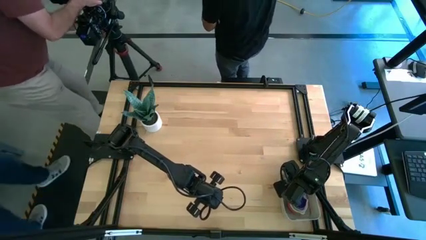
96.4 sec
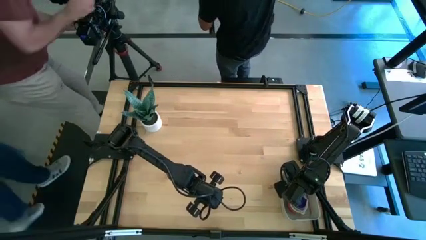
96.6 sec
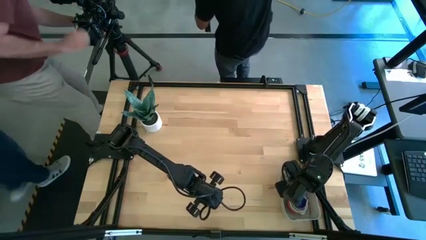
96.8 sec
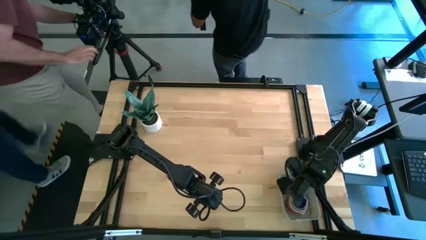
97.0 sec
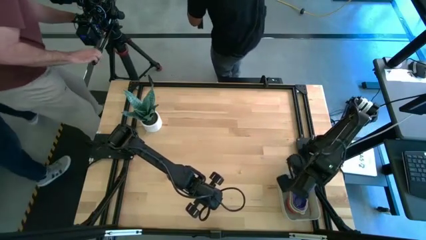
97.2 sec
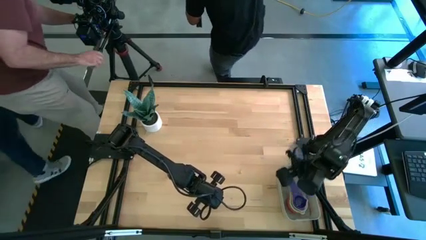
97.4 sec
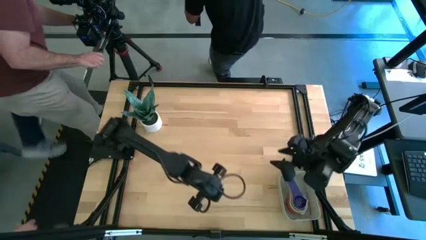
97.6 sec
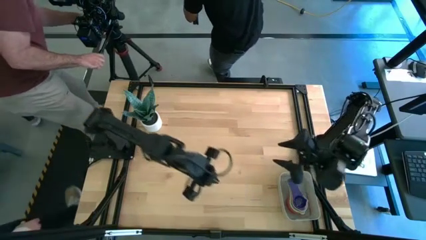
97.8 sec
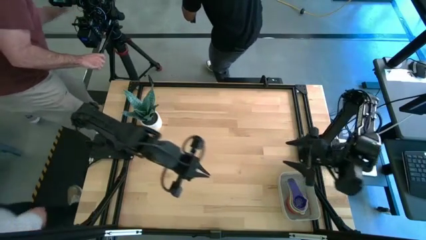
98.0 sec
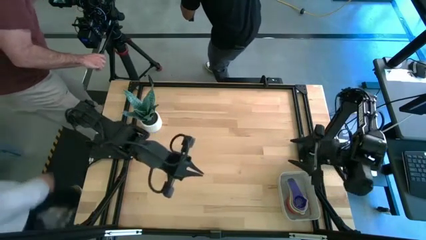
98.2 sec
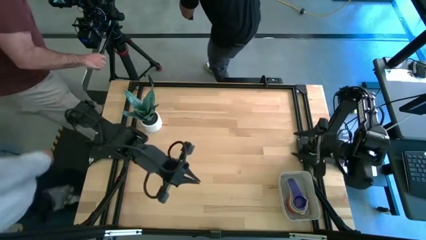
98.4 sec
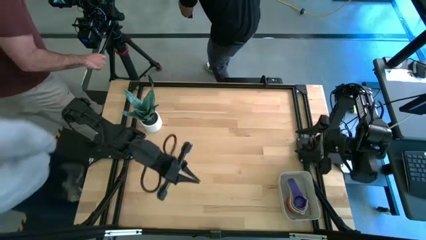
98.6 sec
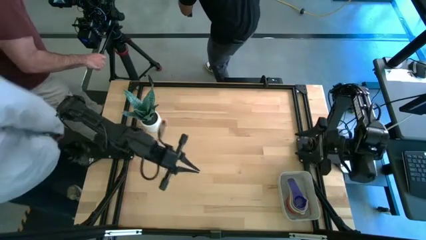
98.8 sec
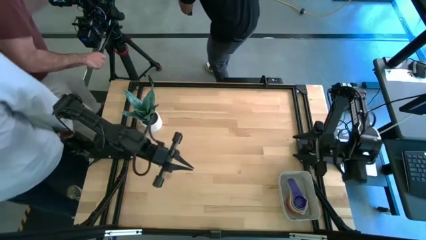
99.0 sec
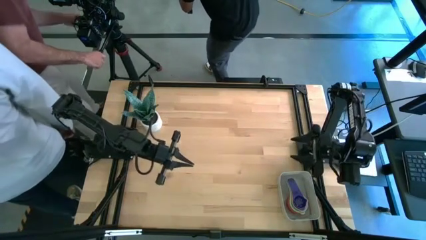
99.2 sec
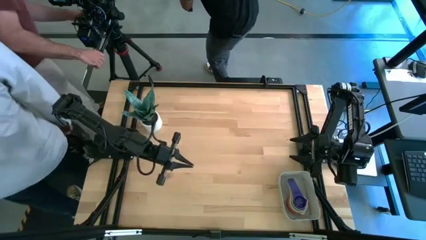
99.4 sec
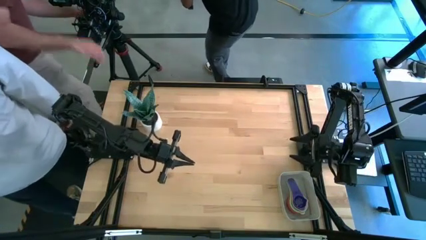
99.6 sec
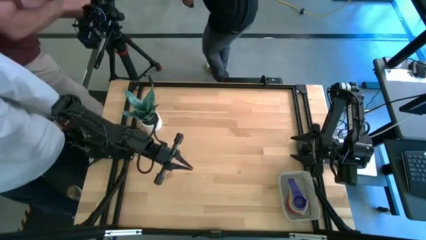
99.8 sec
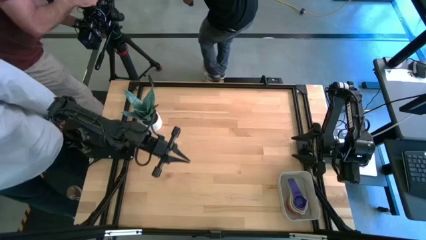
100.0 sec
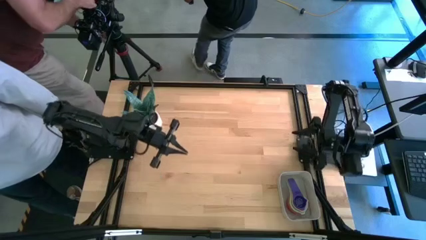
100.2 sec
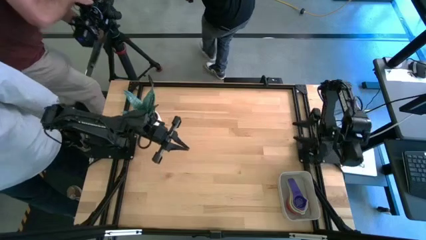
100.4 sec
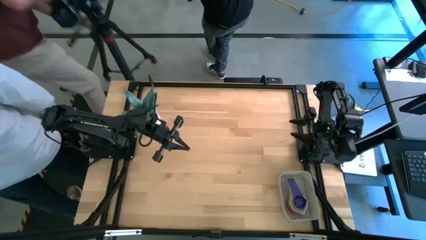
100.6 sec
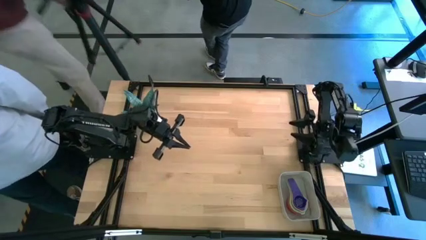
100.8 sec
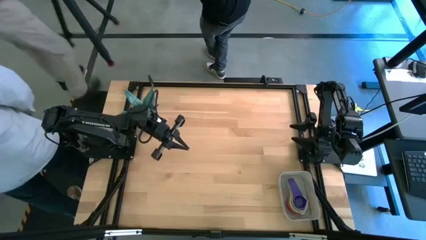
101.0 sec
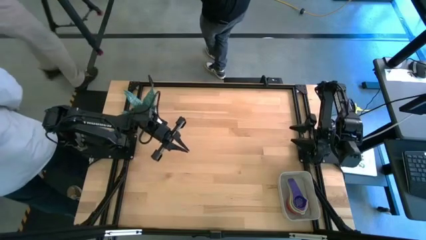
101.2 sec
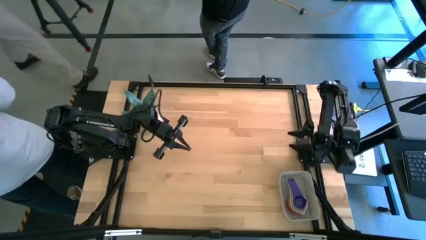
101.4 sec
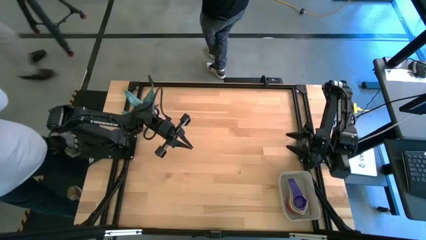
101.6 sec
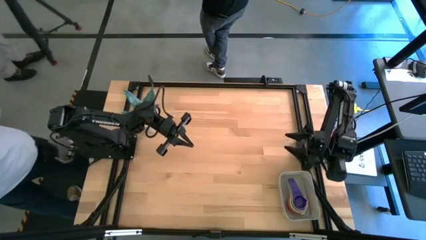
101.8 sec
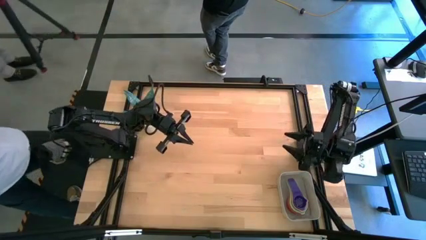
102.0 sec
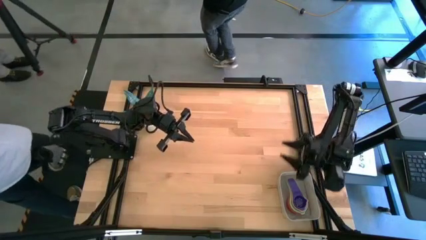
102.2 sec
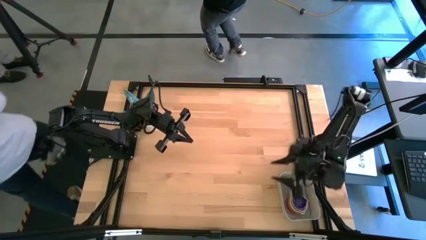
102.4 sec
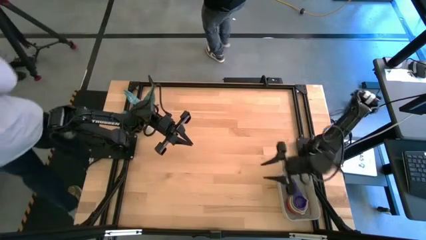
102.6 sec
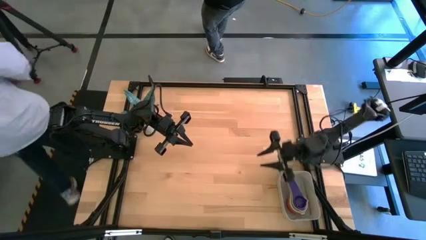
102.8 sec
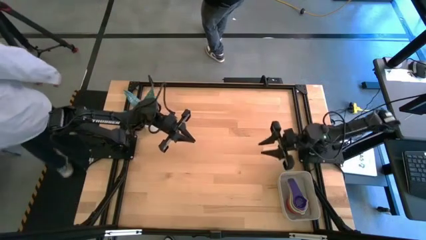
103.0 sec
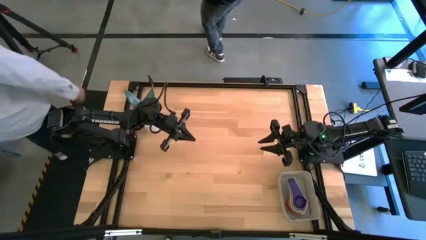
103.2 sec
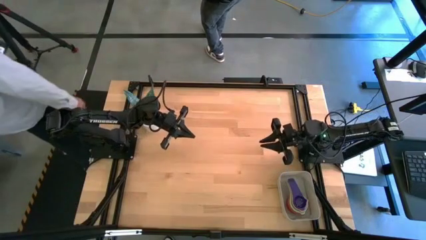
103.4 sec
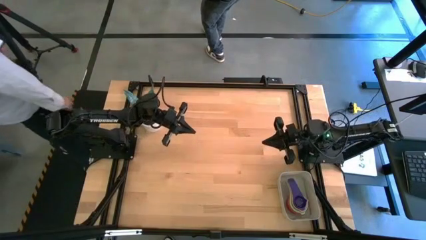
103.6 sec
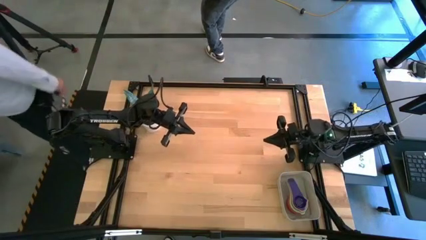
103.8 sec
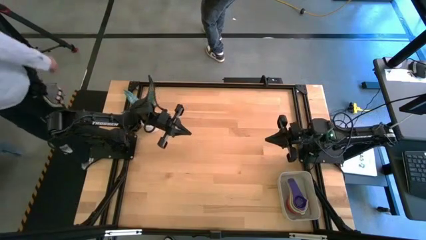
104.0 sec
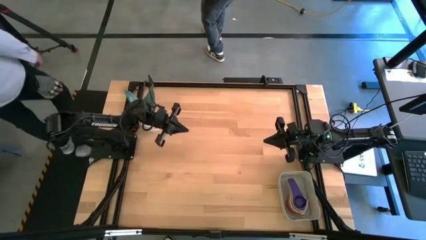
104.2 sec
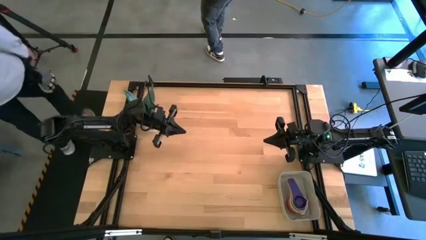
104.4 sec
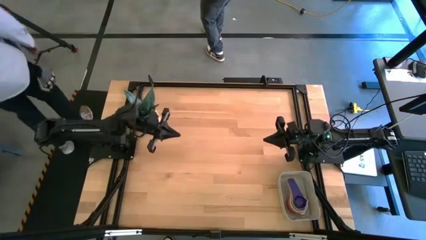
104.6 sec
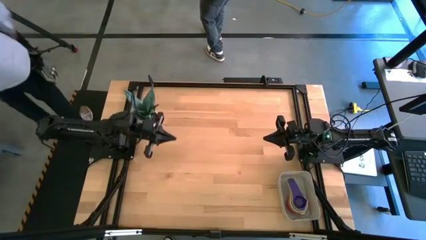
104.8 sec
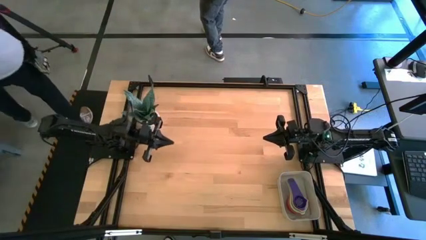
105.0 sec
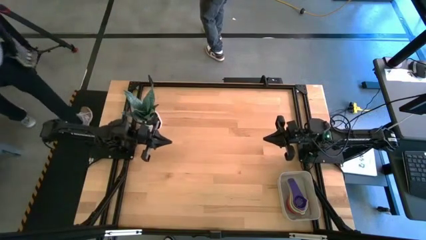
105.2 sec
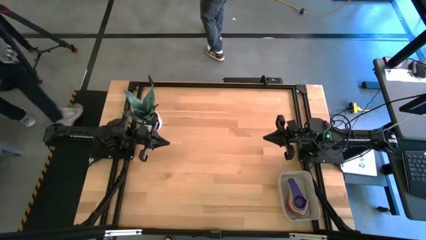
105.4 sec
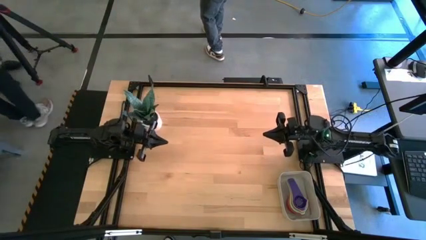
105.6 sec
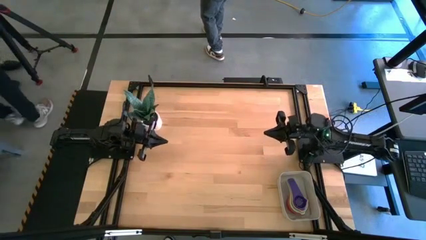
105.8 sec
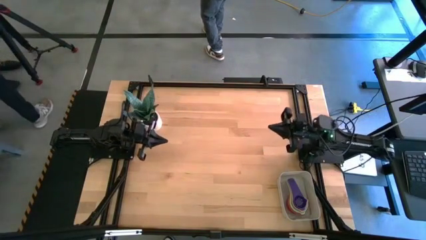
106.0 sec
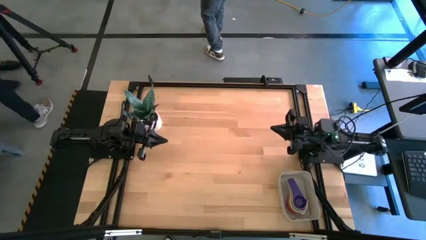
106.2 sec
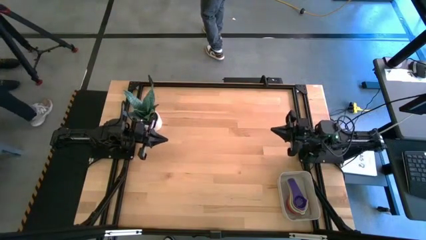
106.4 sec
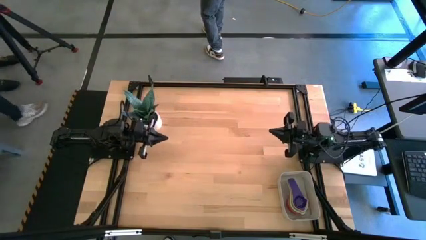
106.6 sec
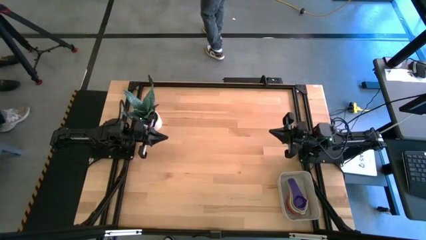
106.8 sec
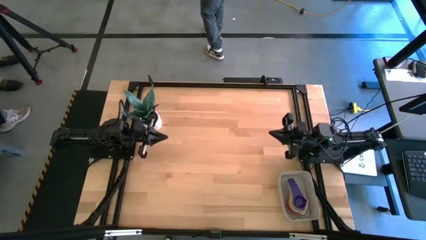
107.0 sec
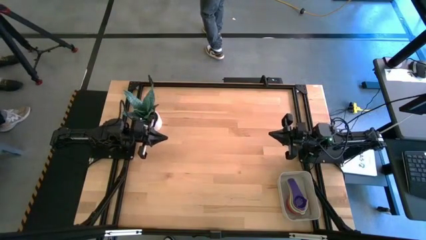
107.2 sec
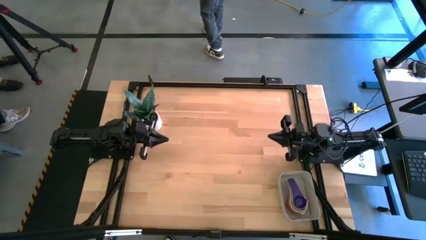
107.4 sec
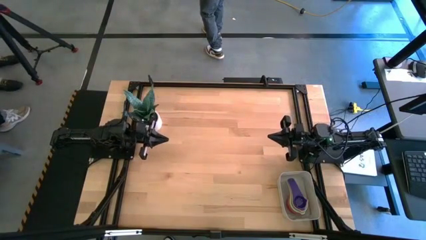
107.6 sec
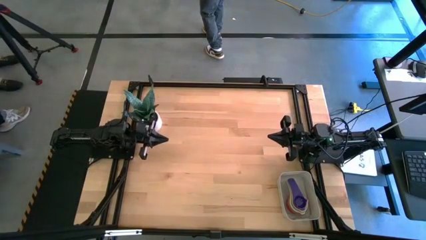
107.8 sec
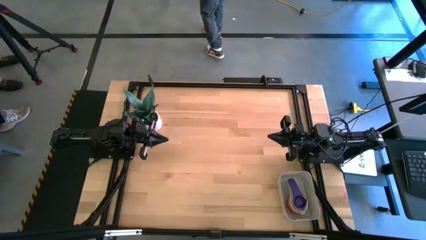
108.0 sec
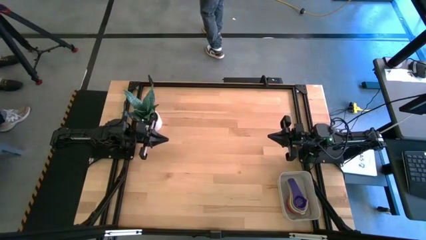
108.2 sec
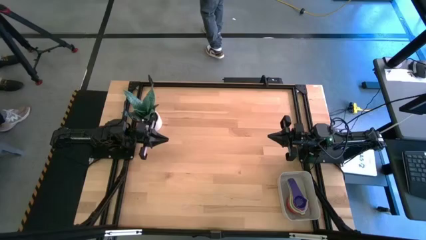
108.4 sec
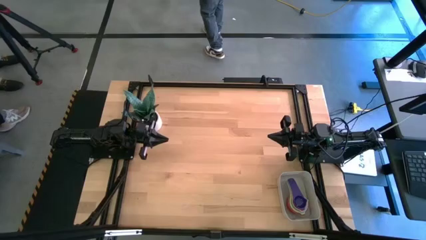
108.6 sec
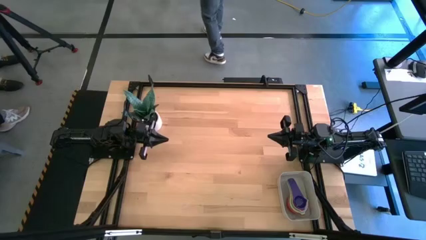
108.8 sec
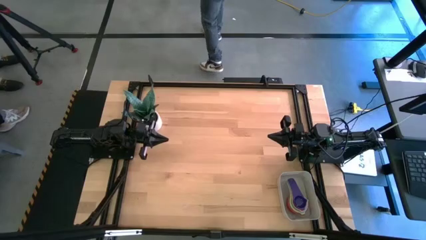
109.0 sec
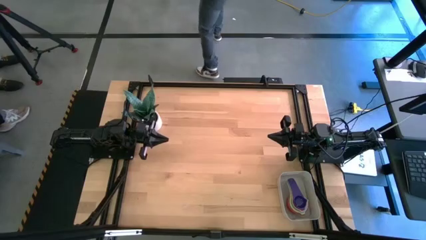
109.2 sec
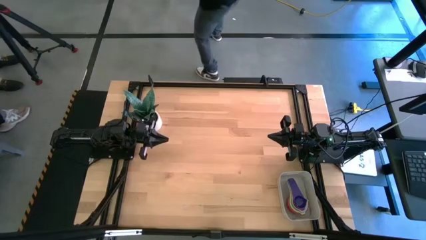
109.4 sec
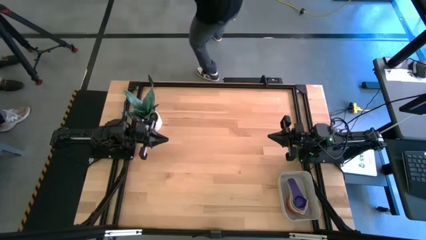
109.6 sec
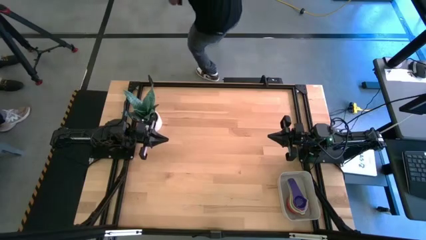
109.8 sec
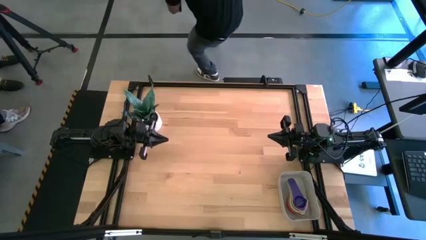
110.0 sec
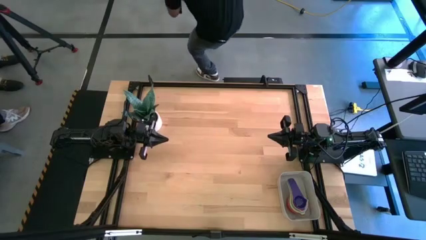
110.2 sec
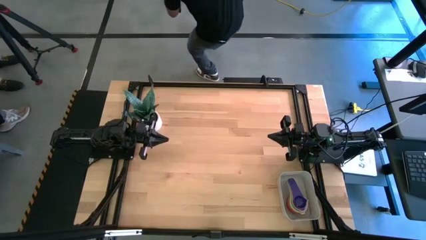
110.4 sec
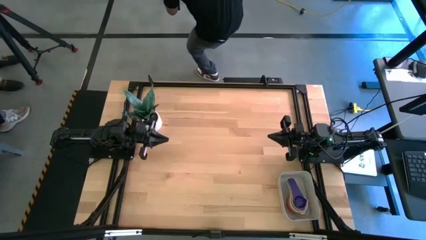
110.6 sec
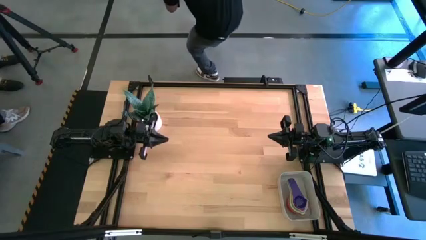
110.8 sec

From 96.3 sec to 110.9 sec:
Task: Nest measuring cups in basket
Return to Home Position

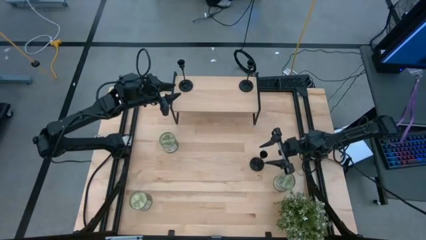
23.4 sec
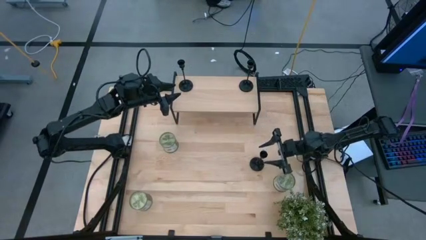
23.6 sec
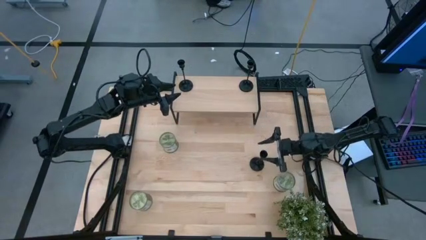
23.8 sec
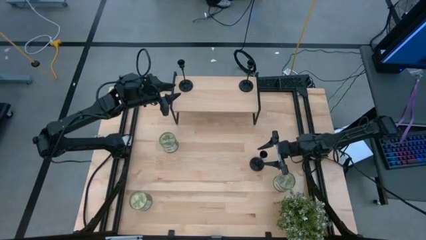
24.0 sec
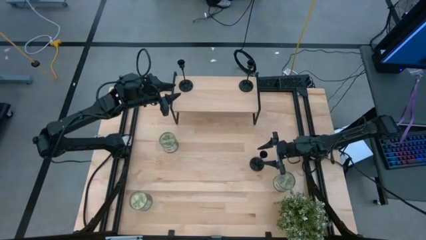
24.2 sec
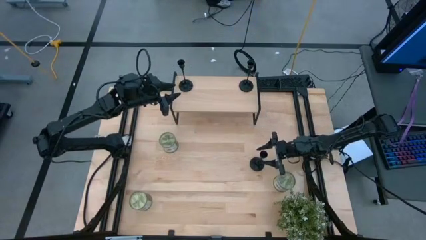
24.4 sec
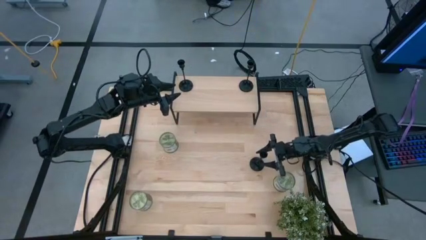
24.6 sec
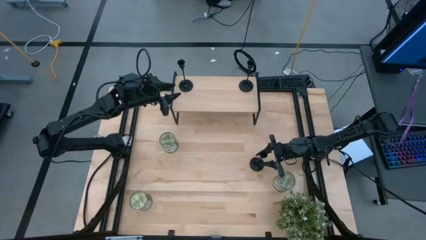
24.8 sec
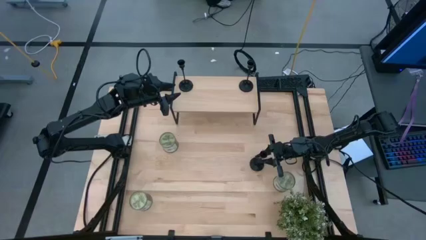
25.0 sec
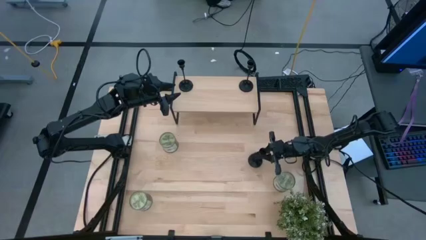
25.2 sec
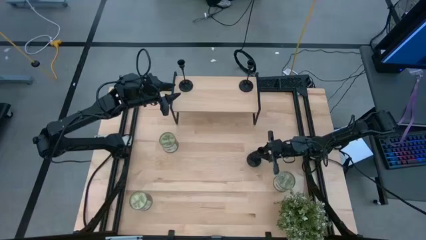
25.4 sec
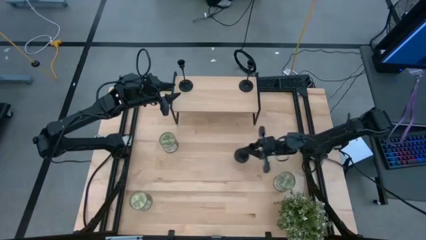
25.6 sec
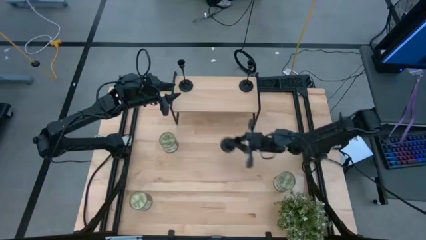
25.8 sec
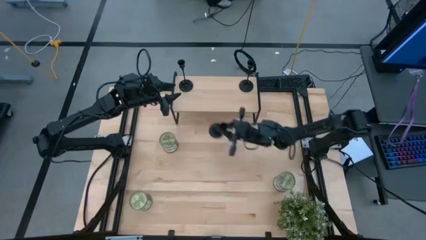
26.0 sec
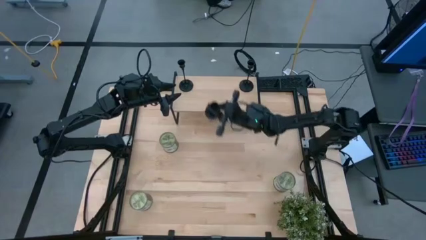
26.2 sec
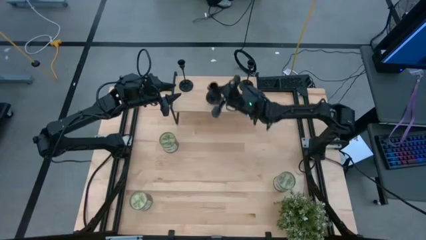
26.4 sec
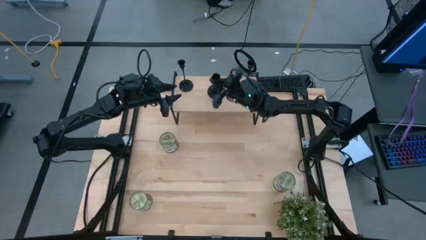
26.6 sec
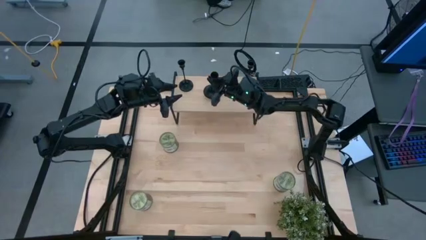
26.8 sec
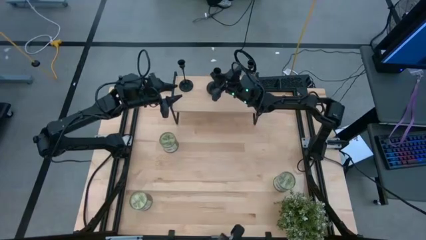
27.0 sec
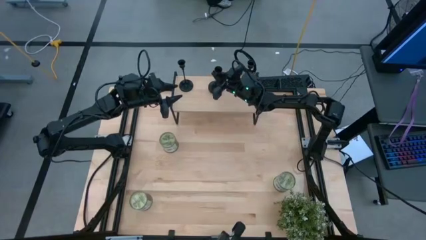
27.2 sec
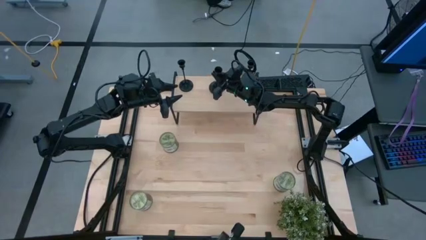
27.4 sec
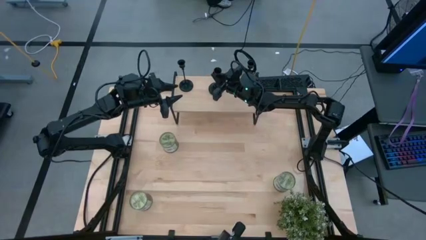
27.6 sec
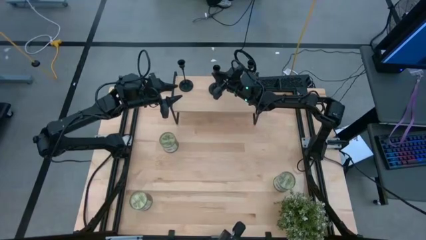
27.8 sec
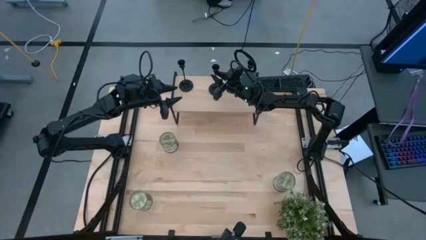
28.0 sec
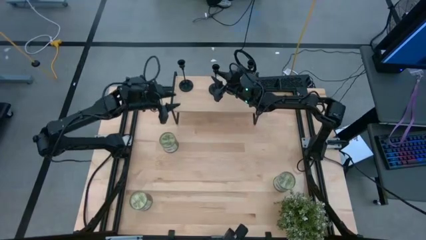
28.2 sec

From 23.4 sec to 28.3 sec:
Task: Pick & Place candle stick holders
Put the black candle holder on the shelf aligned with the other black candle holder
